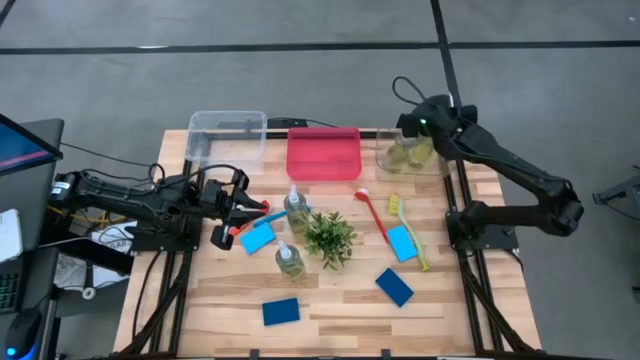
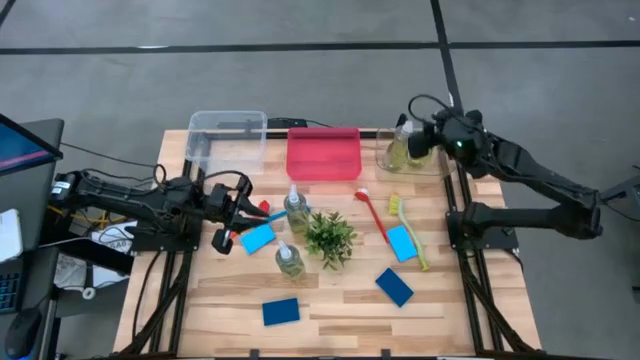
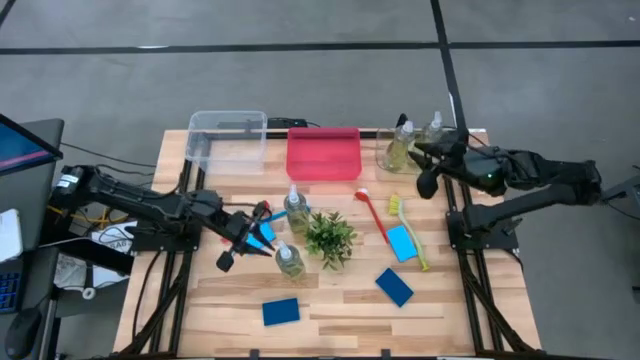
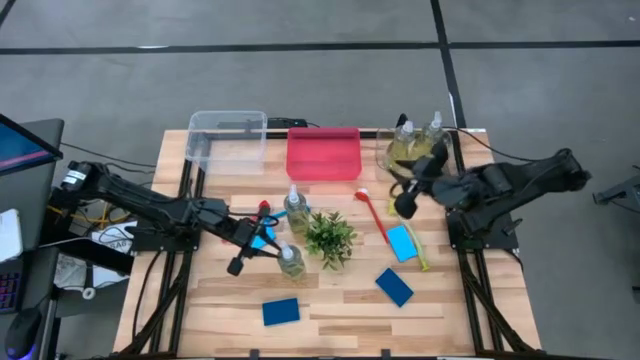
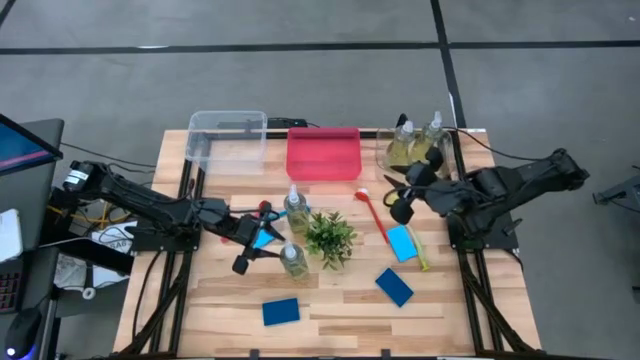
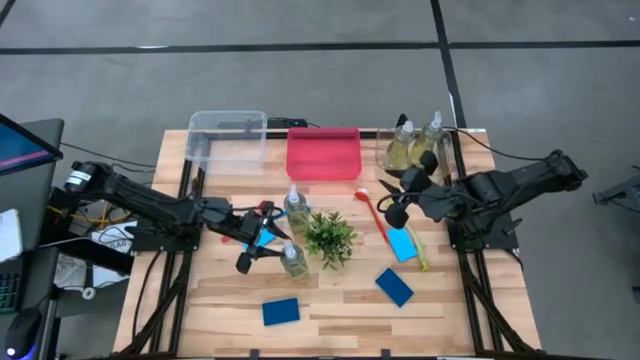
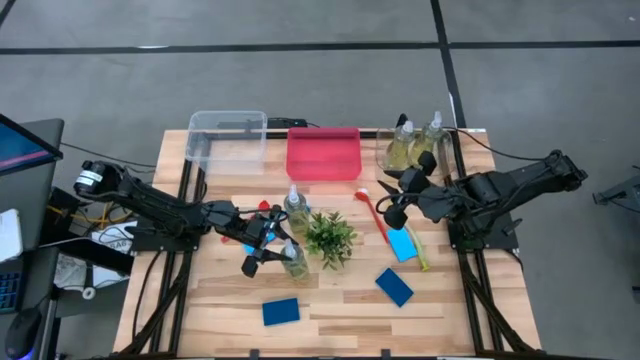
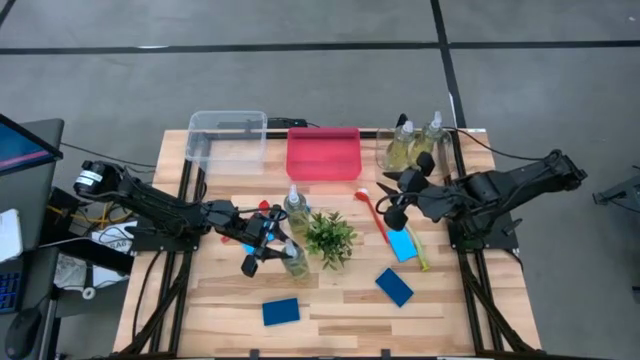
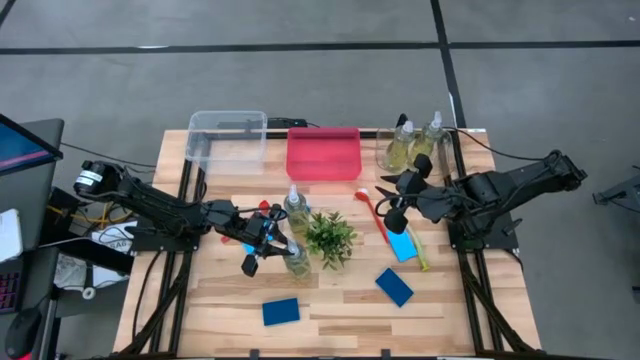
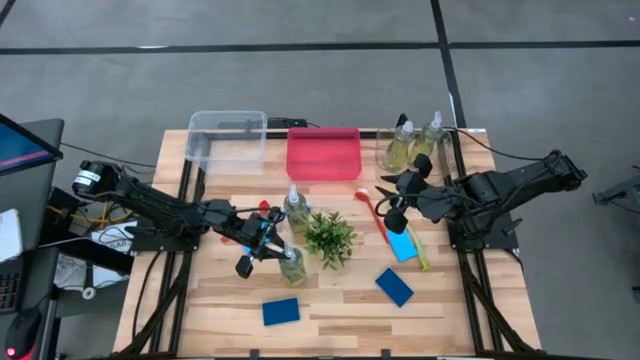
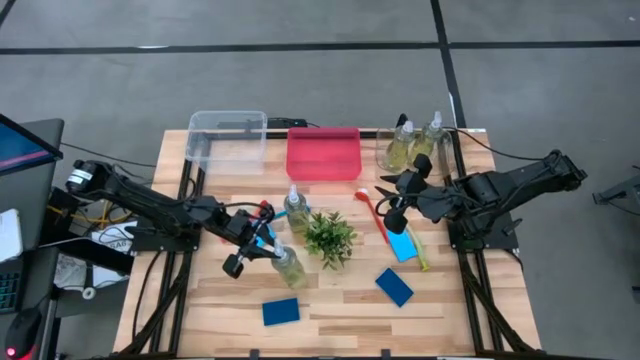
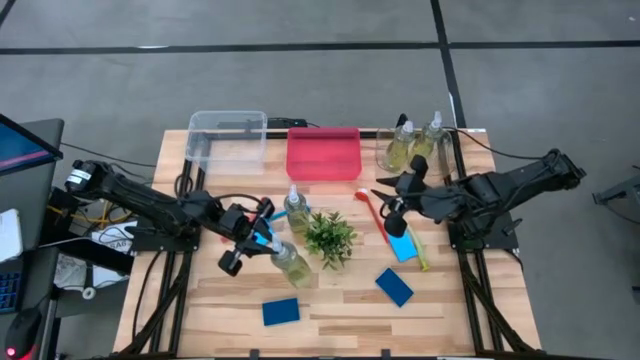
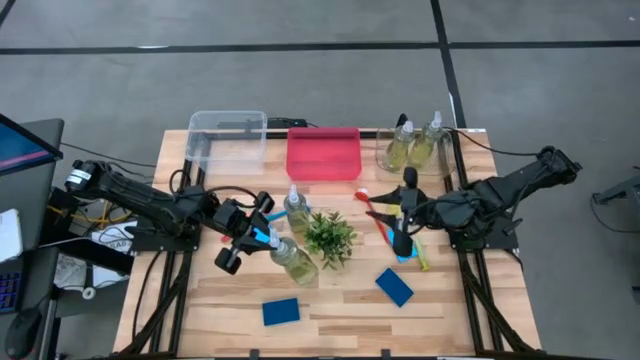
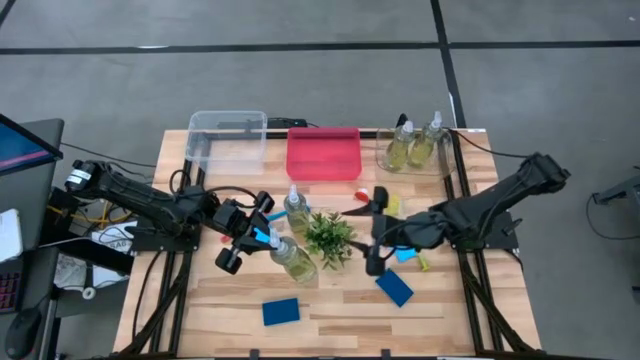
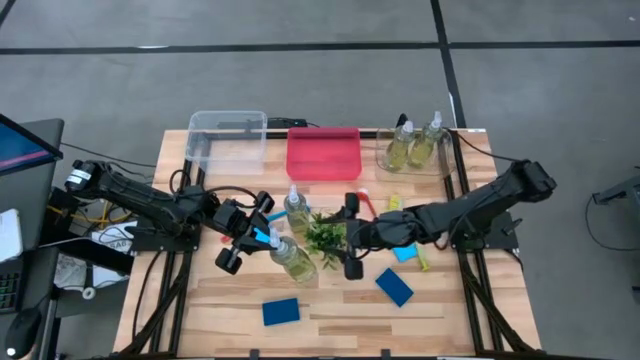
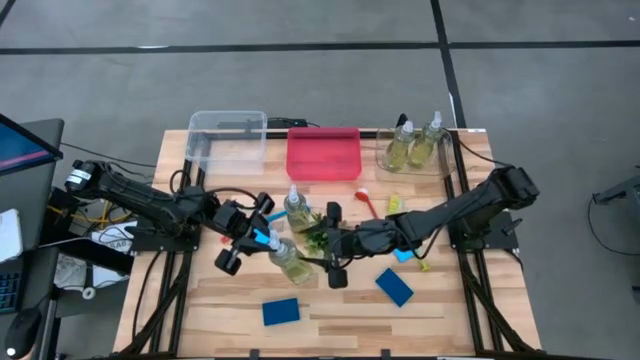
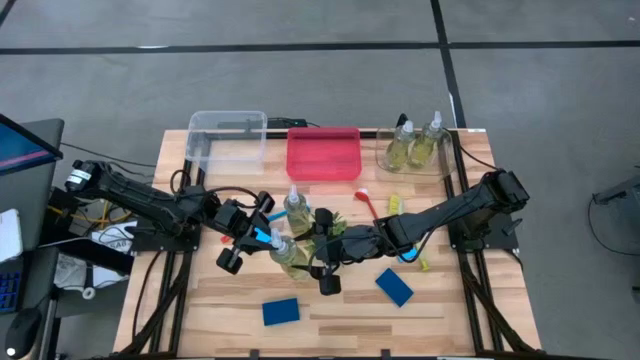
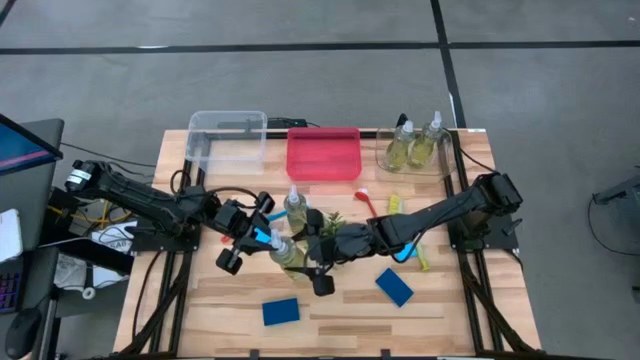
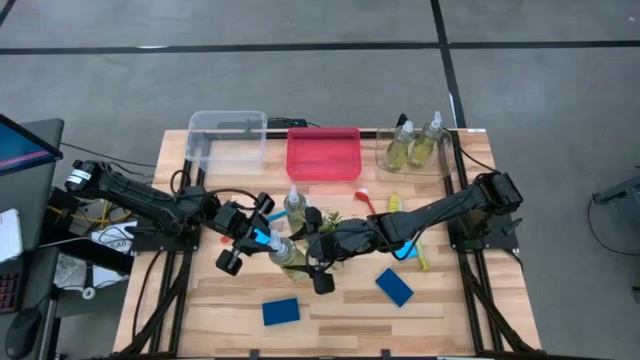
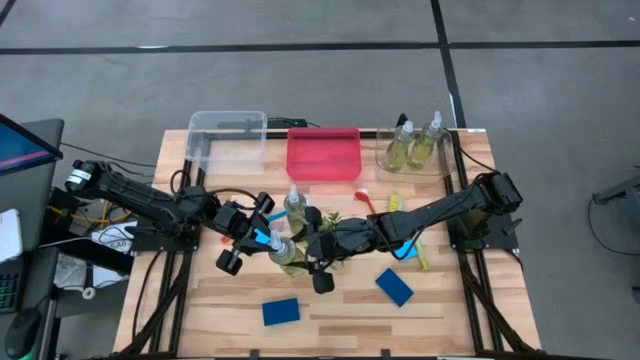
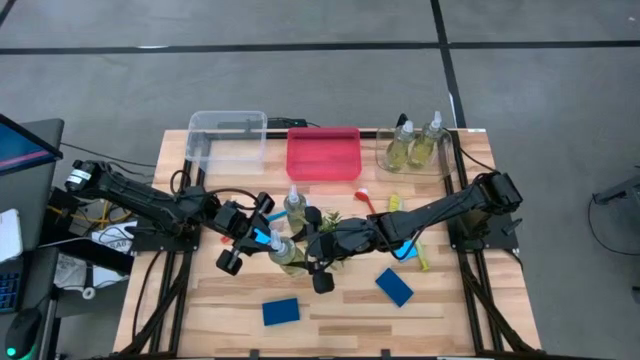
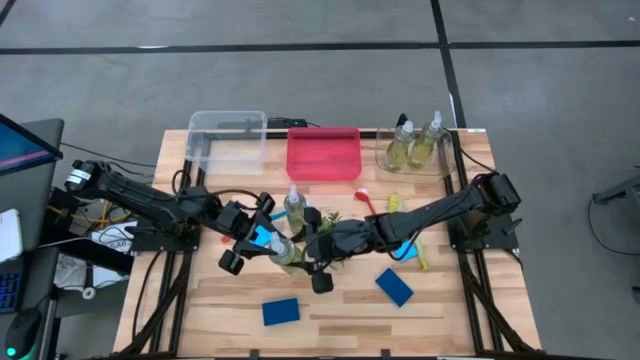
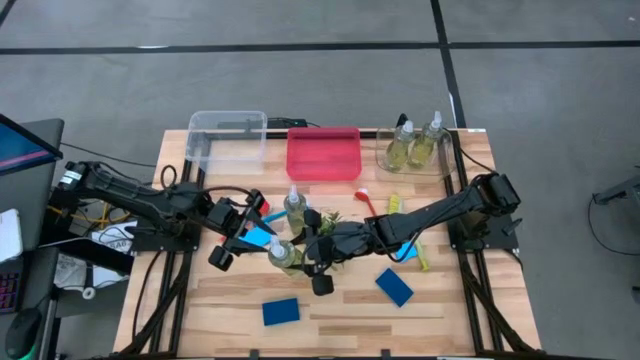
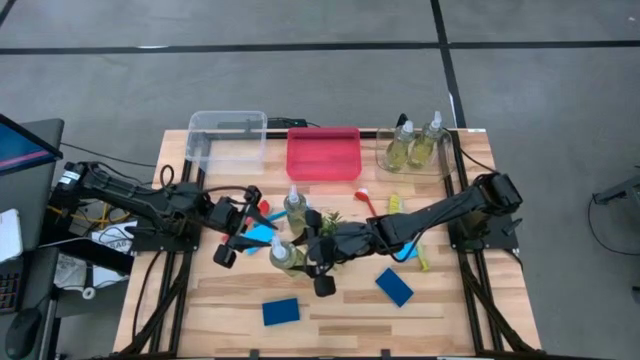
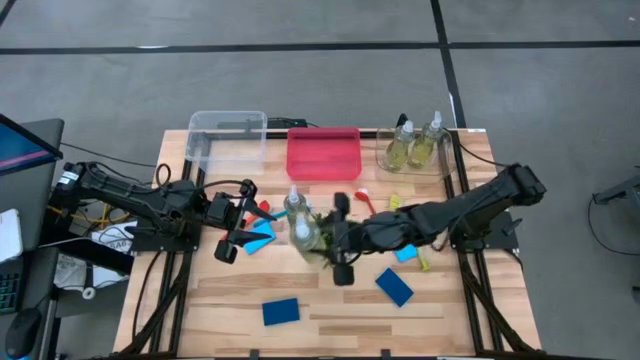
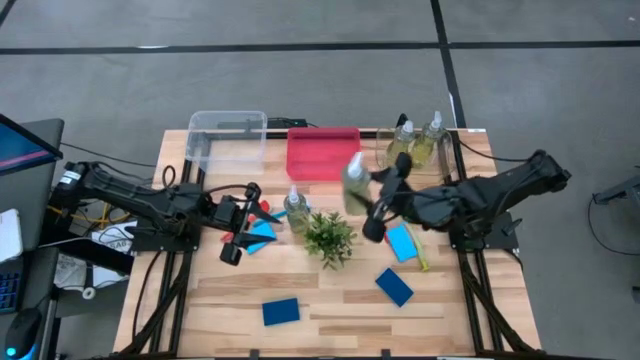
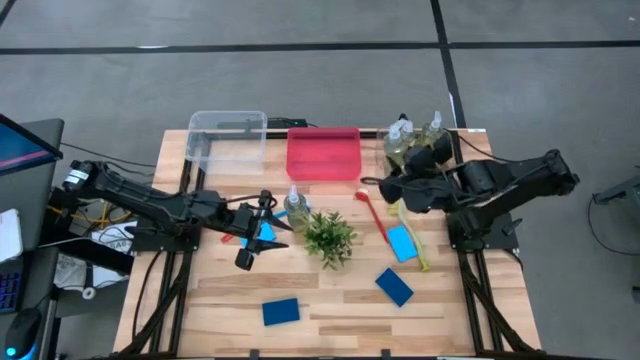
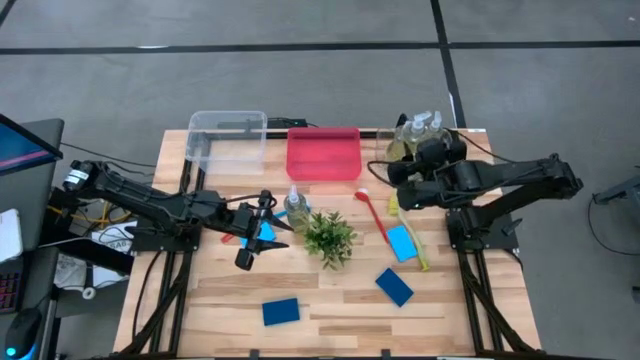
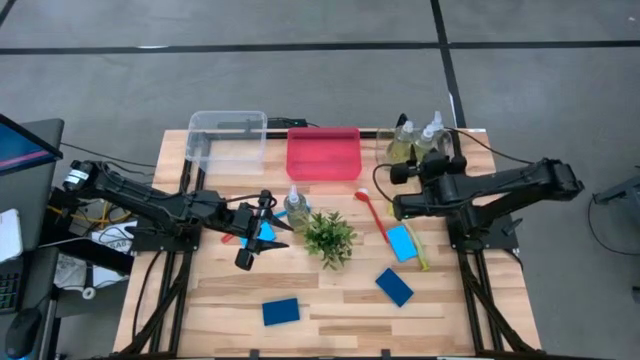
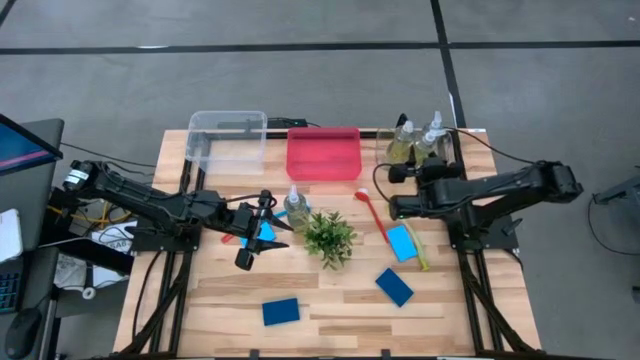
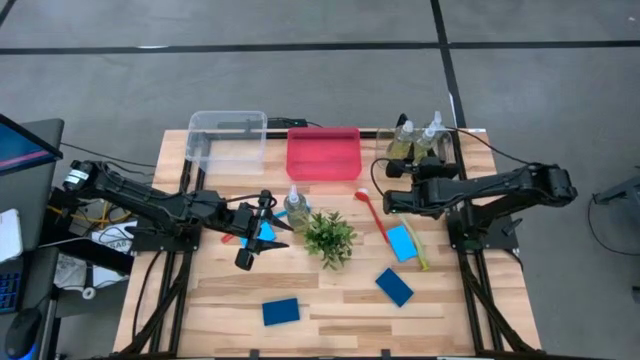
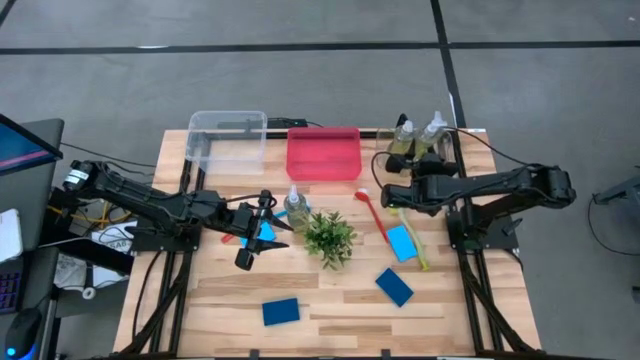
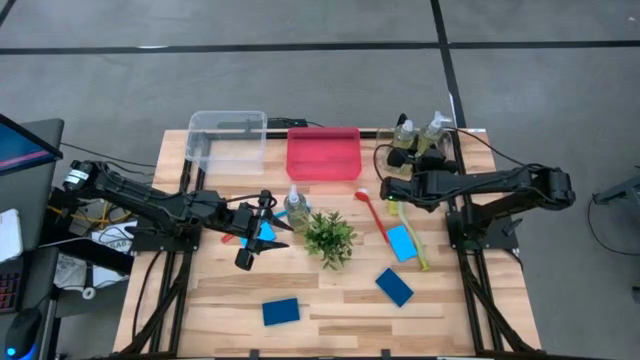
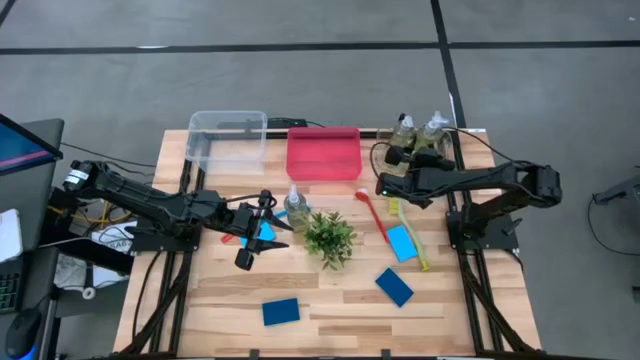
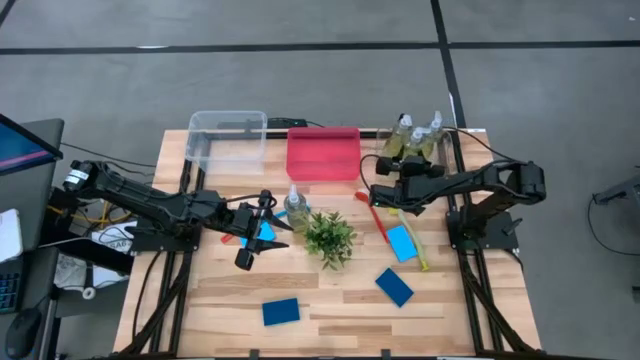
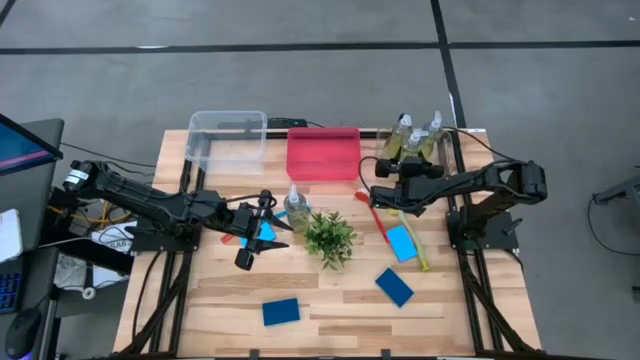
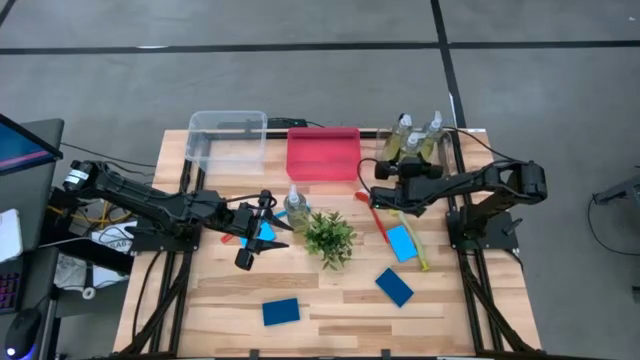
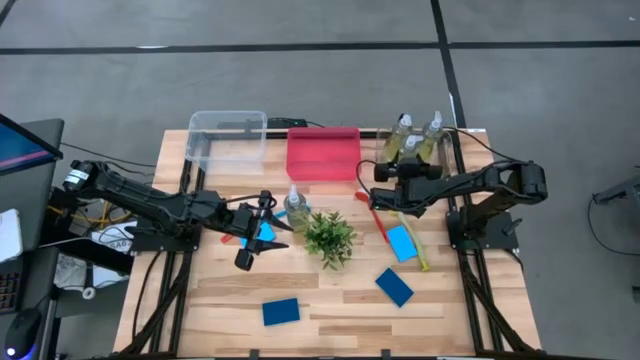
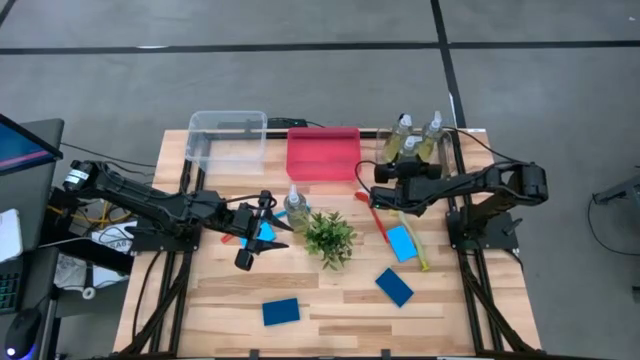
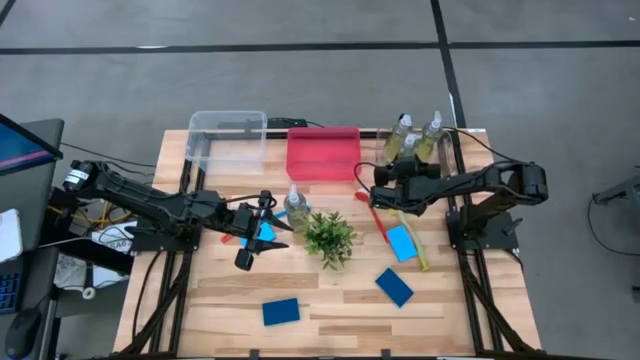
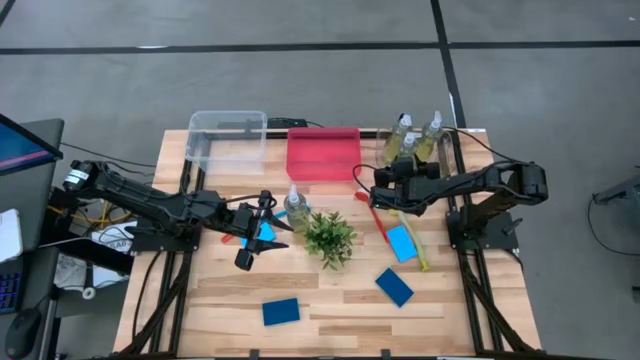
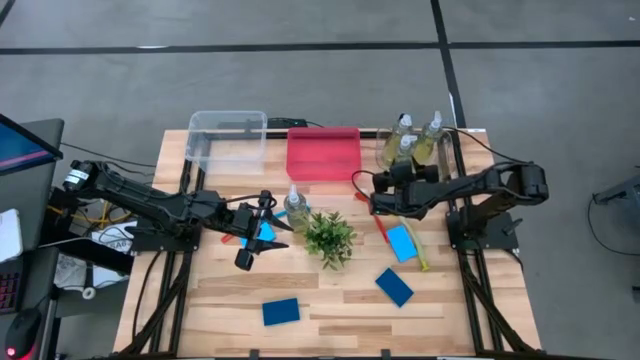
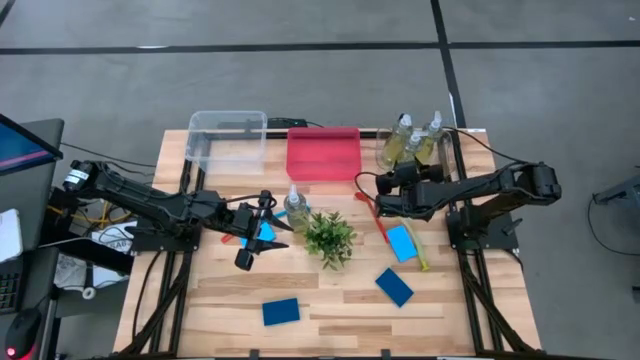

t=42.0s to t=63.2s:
Task: Pick & Place Kitchen Sink Supplies
Put the green dishwashing liquid dispenser into the right transparent bin

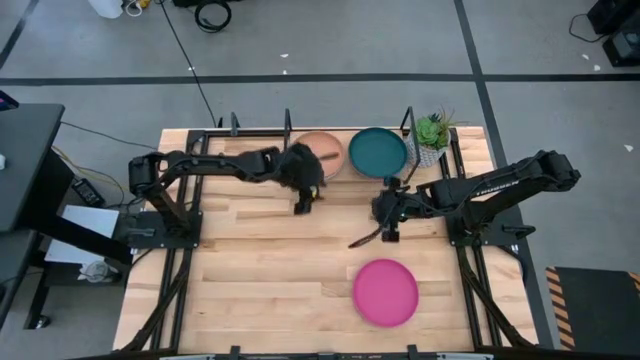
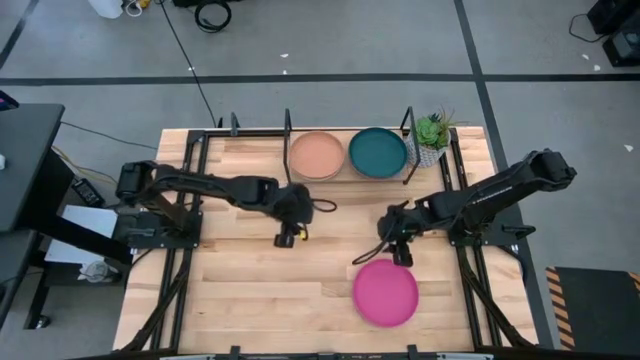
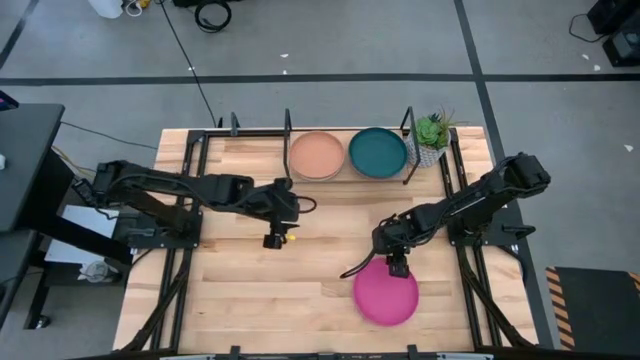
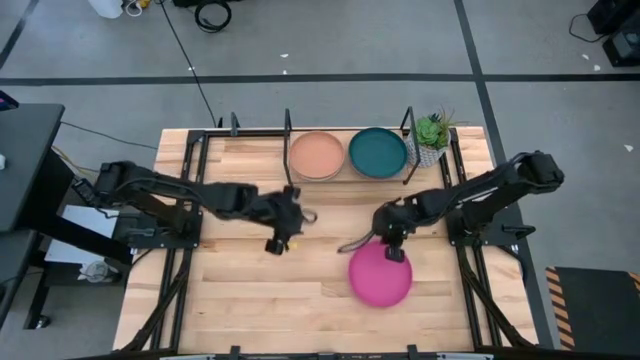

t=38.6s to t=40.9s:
Task: Place and stack plates onto a shelf
Stack the pink plate on top of the dark blue plate on the shelf
